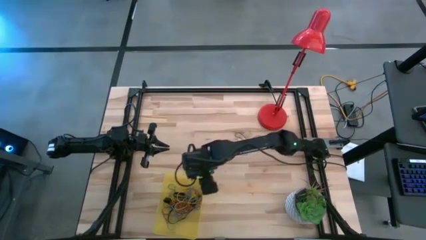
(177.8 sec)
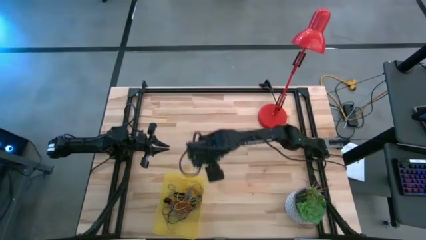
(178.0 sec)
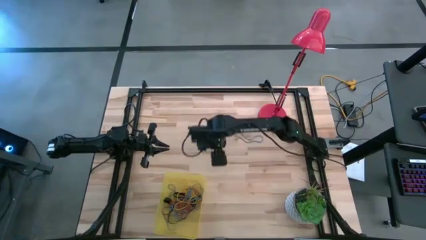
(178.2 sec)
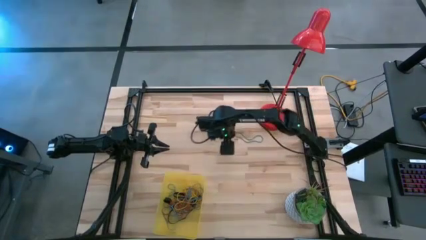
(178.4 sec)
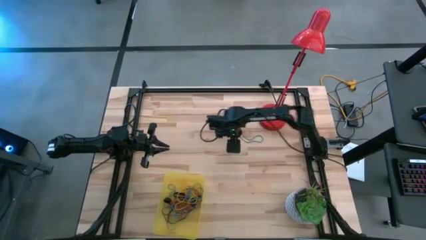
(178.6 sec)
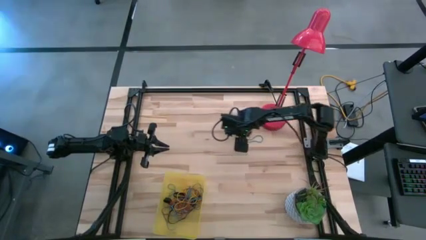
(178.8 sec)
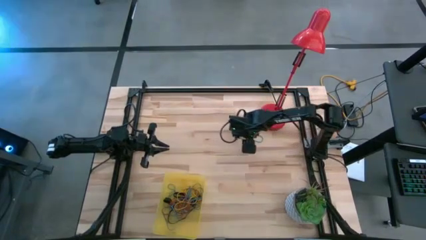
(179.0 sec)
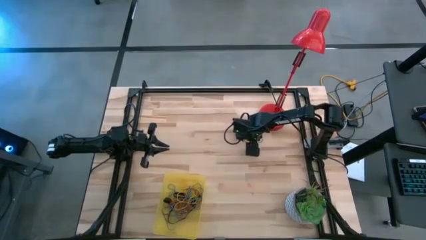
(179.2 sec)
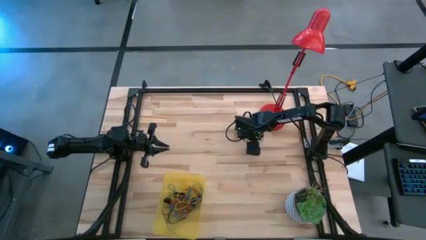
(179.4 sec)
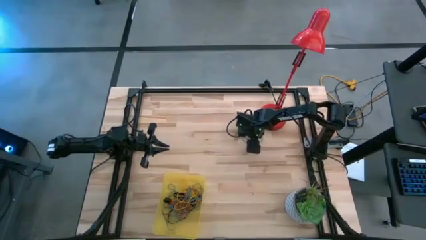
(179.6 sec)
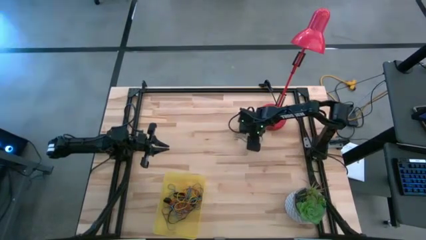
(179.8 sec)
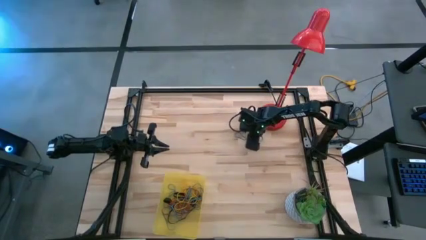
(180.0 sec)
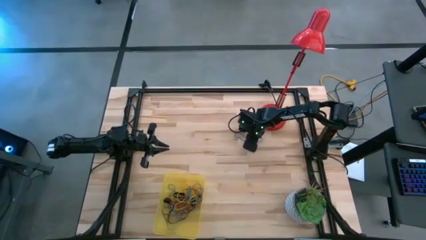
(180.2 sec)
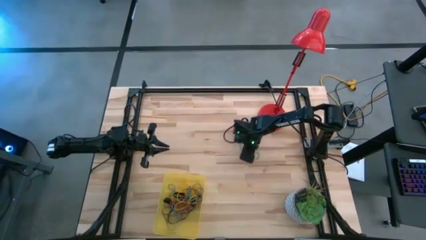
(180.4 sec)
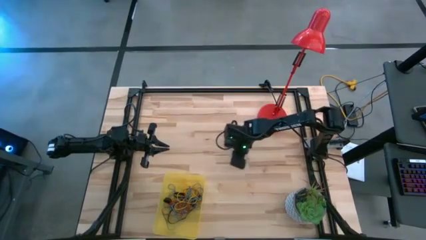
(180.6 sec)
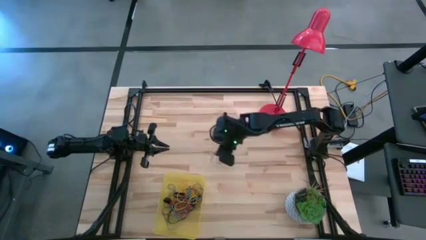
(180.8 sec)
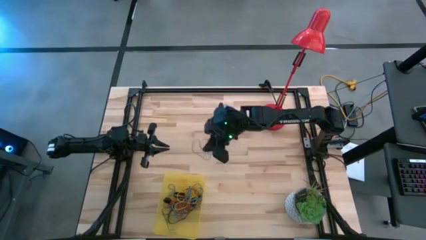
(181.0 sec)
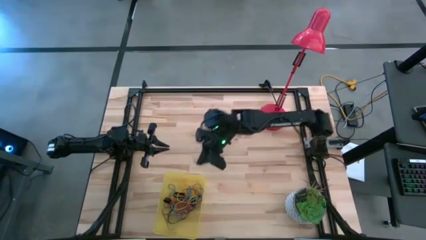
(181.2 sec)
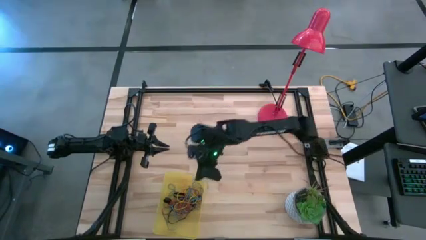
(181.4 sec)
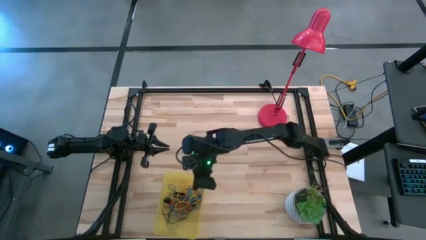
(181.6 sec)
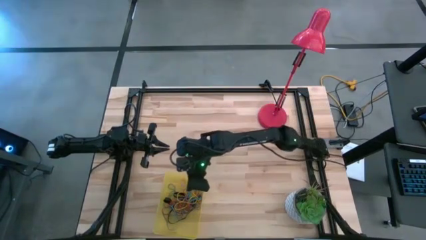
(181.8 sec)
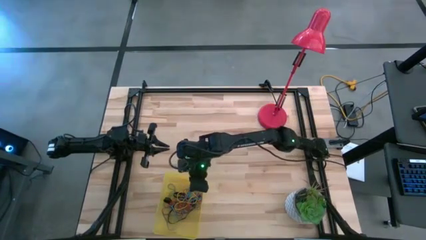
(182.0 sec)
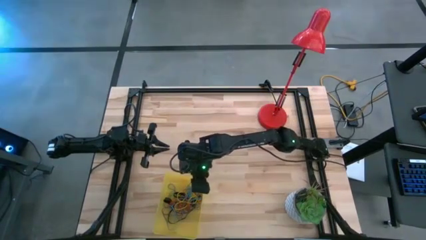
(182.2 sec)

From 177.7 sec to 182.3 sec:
Task: Pick and place rubber bands into bin
Put the blue rubber band into the bin

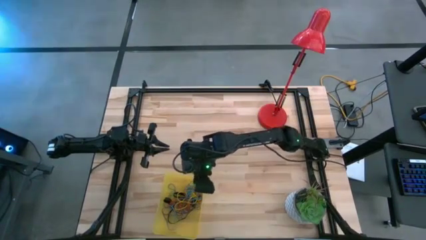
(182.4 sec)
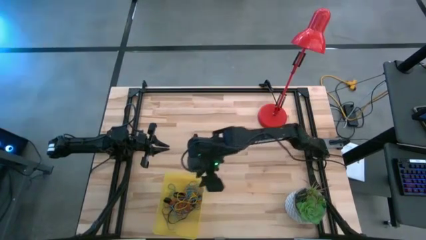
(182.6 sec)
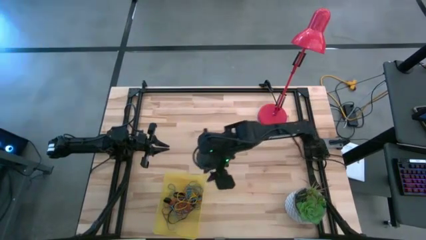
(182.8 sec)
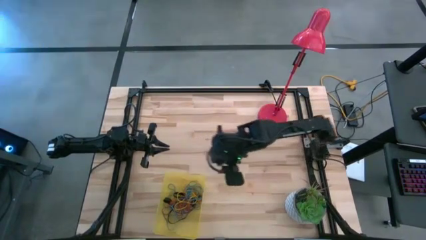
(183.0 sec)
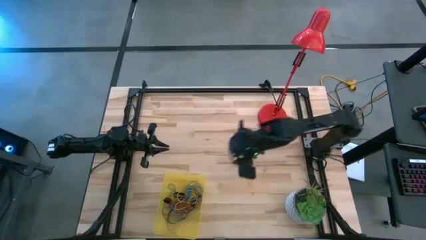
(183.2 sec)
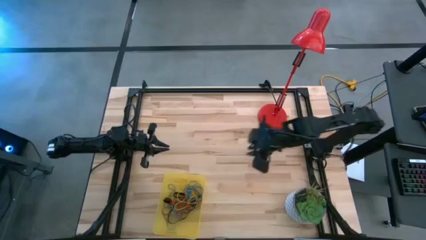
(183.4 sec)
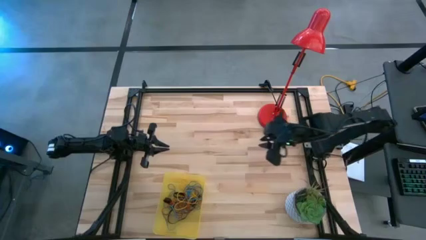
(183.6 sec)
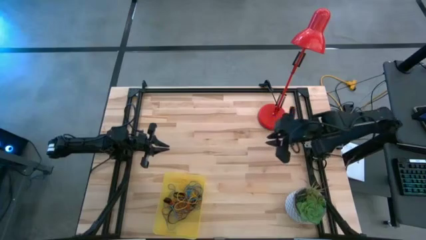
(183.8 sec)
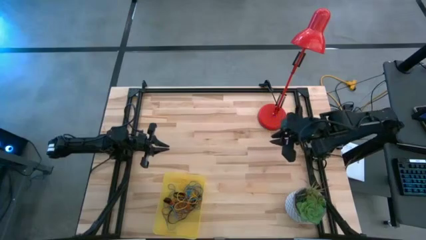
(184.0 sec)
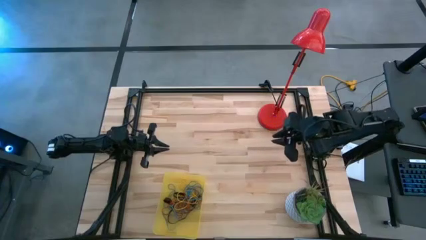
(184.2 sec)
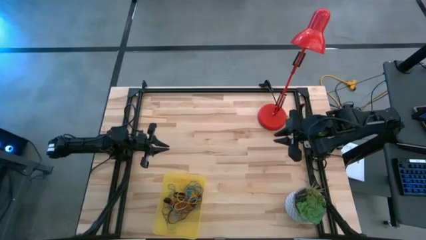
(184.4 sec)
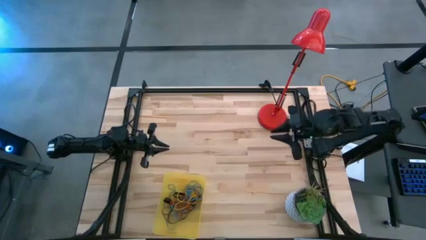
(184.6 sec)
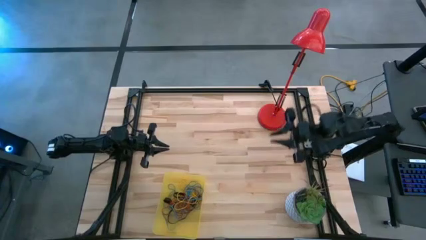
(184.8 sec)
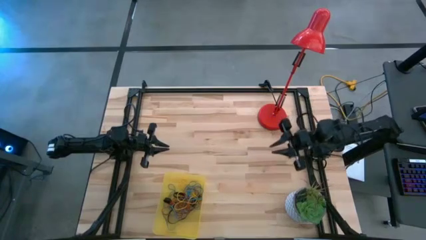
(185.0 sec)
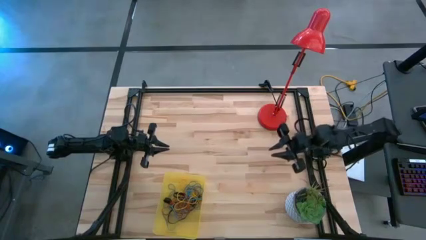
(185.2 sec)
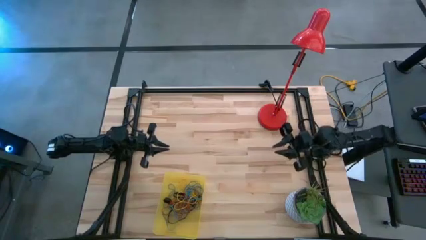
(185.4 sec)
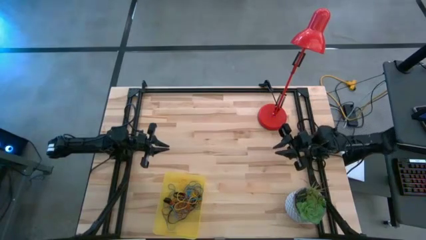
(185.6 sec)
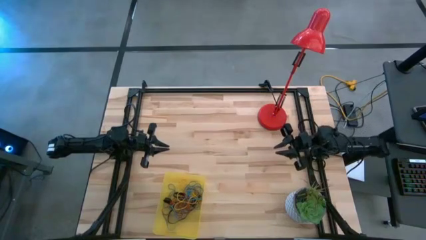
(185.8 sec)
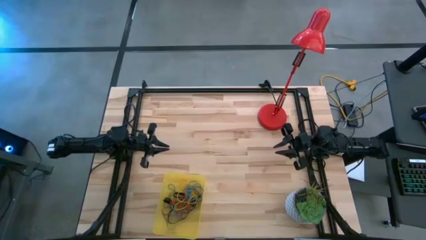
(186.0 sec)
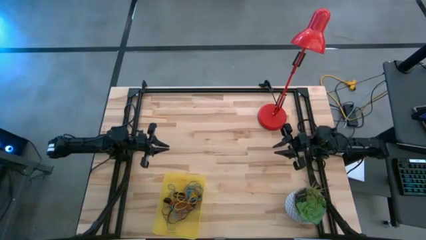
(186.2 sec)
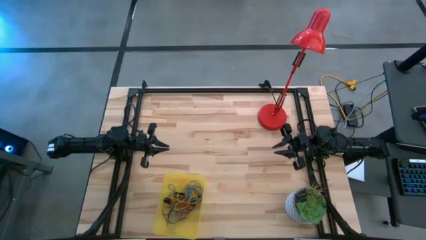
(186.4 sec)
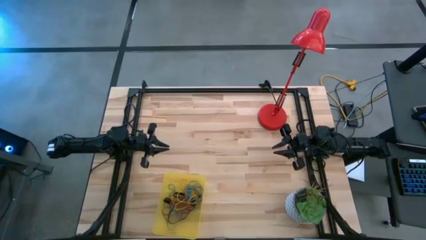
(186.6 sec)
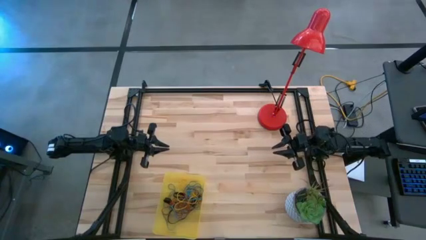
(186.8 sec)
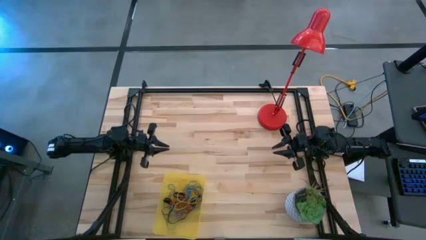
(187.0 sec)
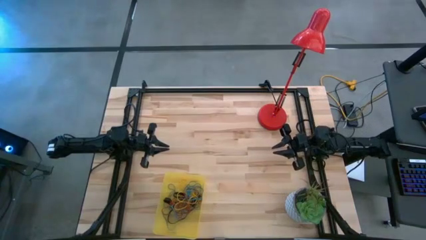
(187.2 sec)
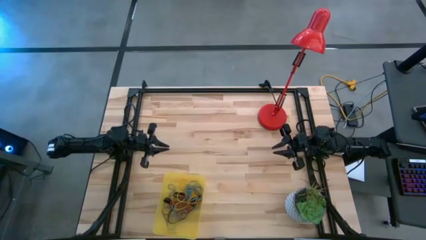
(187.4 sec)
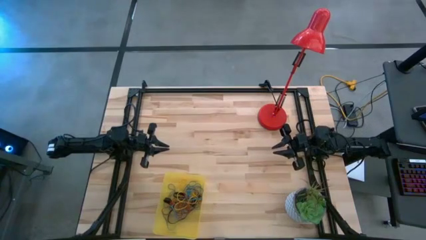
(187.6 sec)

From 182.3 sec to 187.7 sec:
Return to Home Position

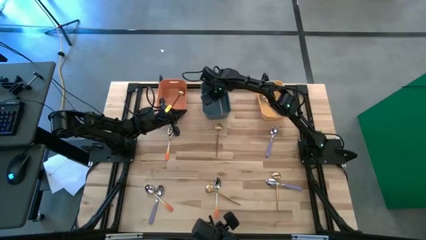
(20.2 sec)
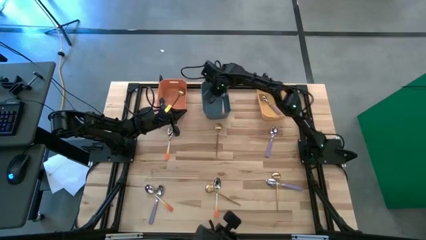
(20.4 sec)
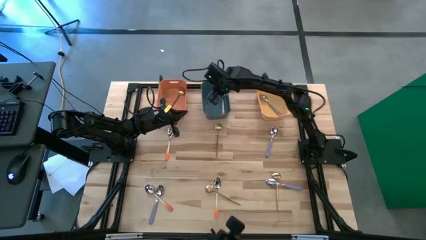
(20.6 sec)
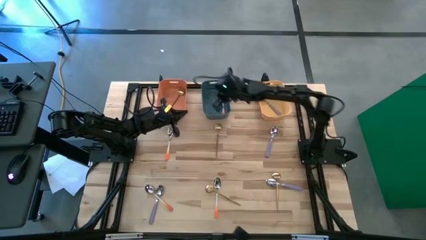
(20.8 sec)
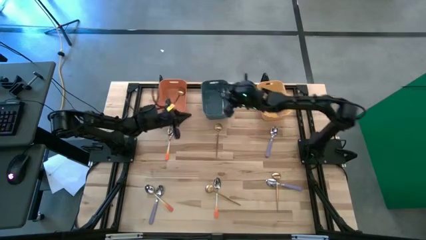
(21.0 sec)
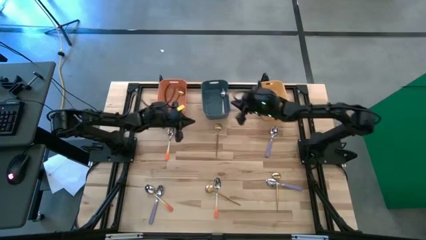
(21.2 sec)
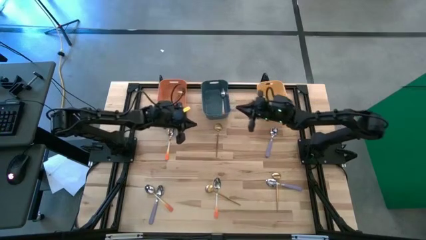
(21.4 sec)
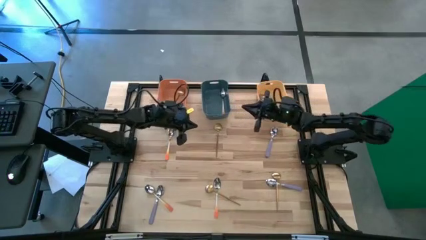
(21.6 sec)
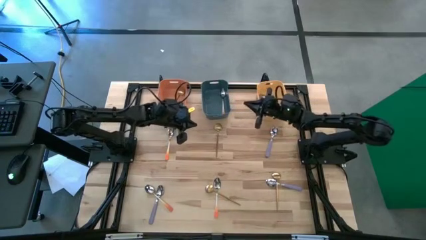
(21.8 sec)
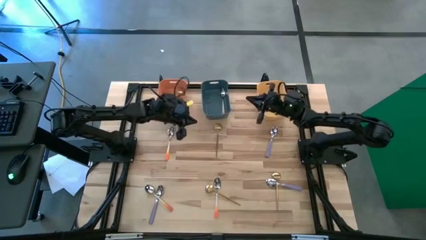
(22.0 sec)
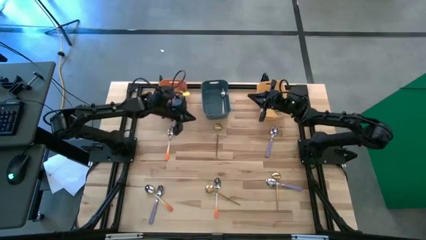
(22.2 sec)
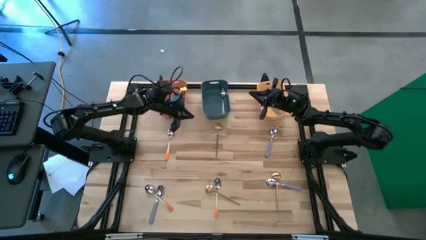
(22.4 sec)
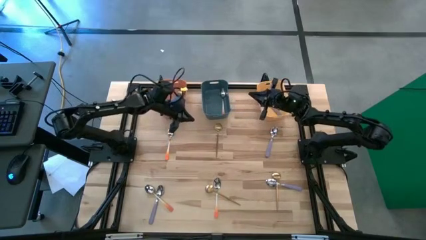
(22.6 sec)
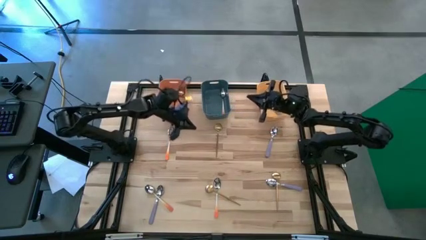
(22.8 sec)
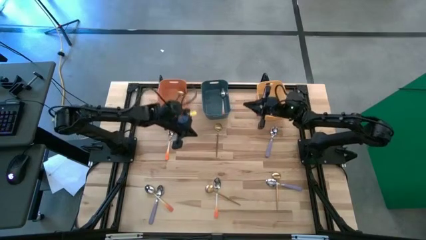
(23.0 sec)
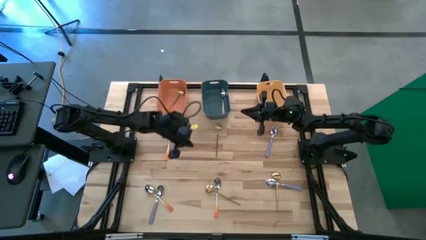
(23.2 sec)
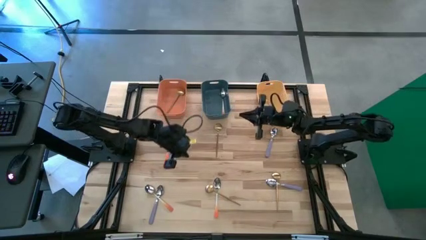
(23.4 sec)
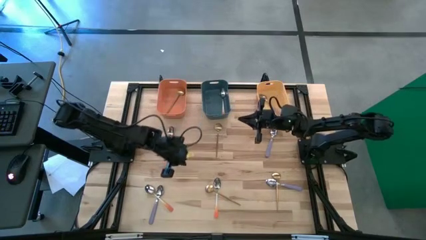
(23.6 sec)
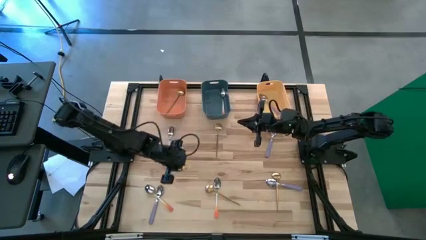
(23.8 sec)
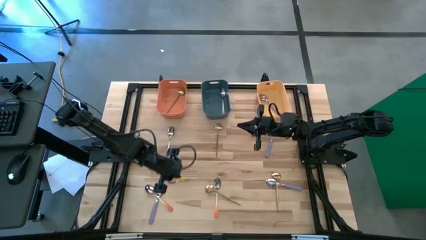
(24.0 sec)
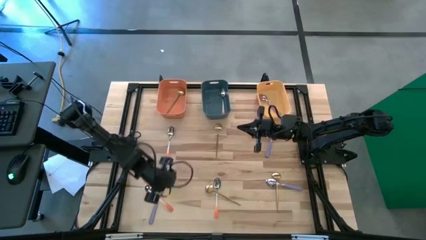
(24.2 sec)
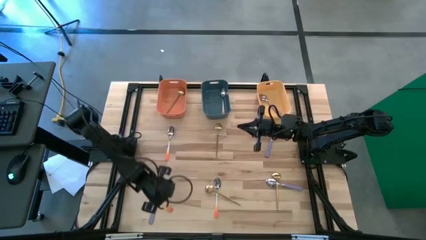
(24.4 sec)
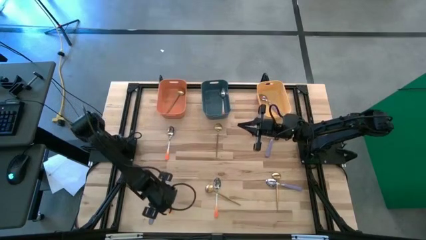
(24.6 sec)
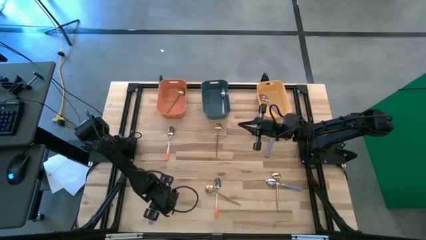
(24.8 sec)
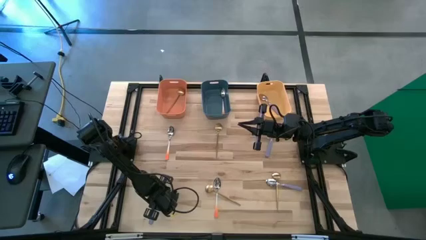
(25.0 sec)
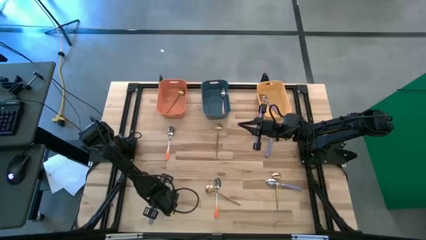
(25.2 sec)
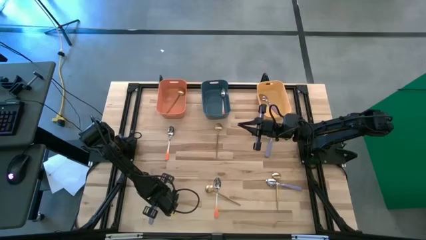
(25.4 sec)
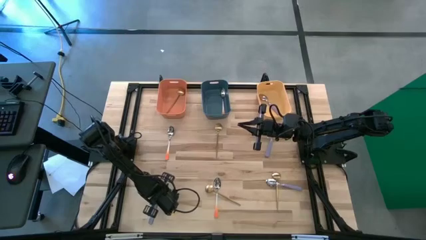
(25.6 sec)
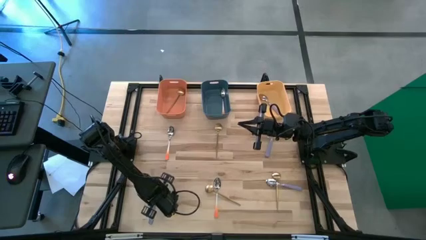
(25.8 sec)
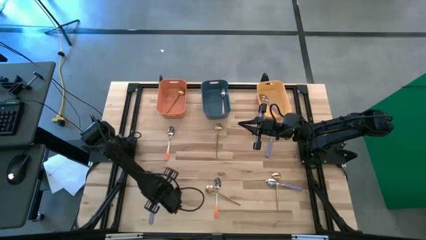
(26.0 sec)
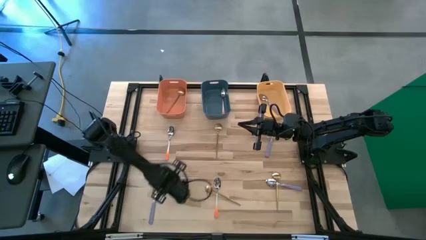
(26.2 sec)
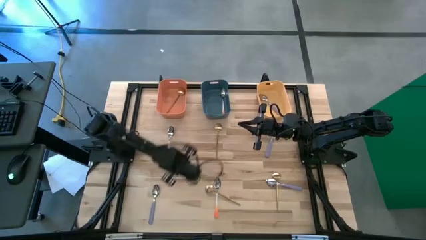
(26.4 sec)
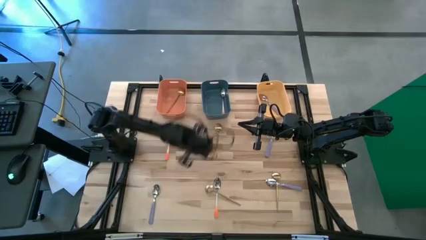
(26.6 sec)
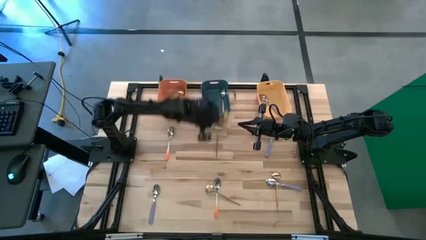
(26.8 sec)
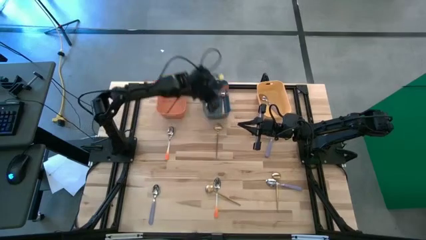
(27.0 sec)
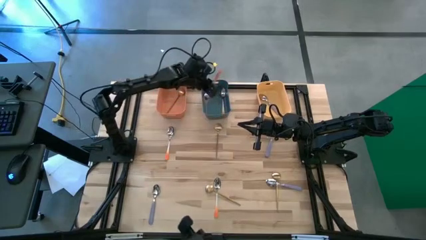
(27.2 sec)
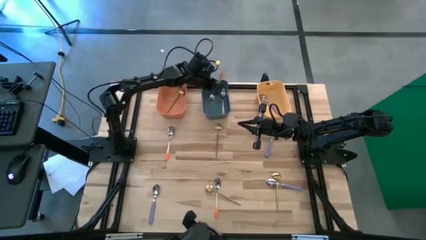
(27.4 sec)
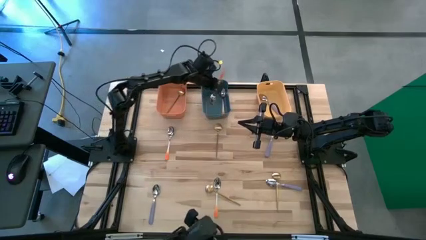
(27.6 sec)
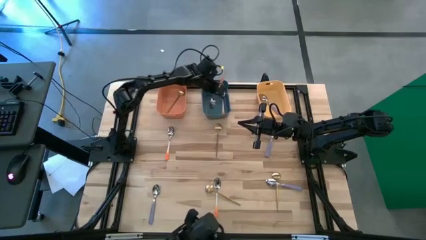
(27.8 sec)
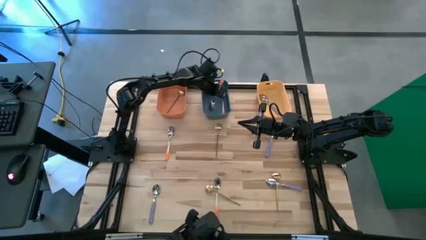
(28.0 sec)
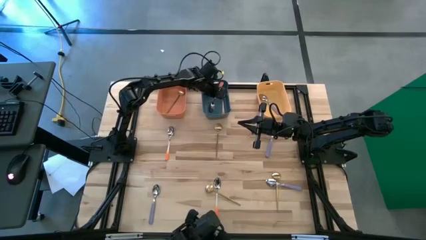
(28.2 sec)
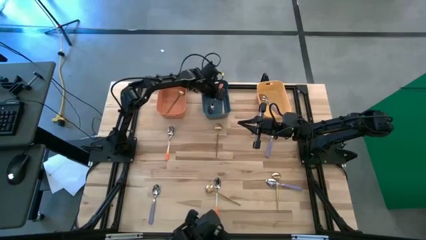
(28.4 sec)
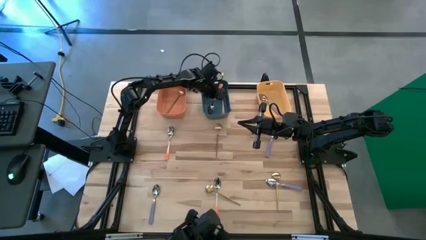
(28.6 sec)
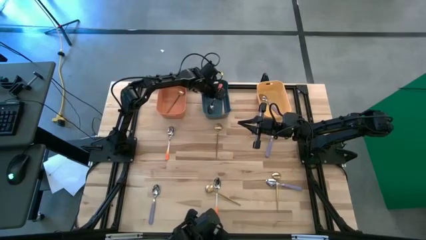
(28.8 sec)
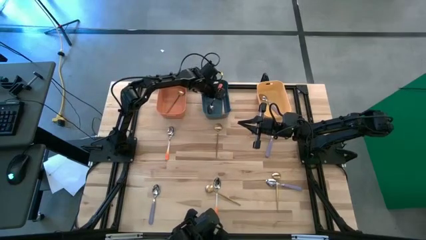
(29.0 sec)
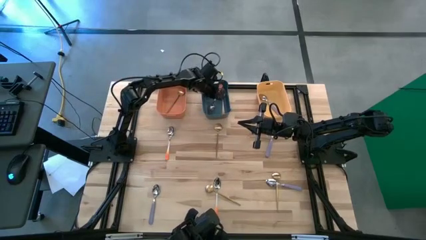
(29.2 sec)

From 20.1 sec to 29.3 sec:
Task: Sort silverware by color (type)
Put the orange spoon into the blue bin
